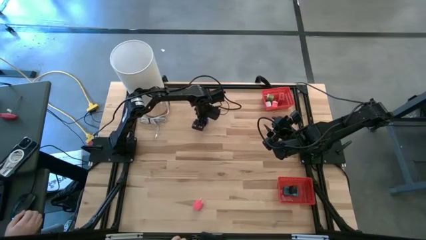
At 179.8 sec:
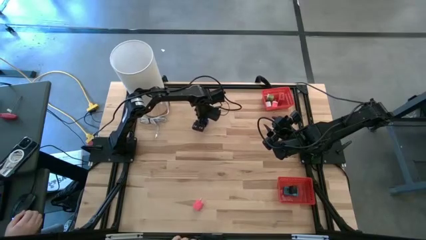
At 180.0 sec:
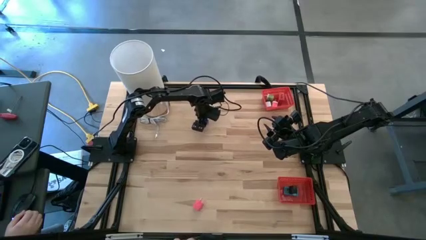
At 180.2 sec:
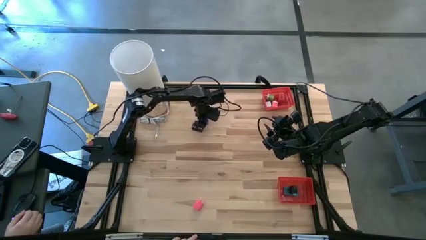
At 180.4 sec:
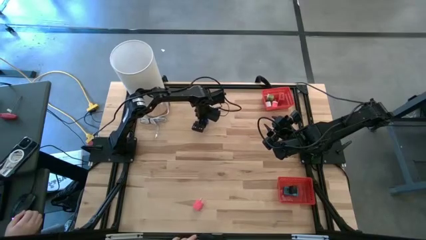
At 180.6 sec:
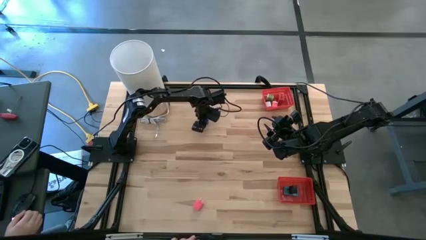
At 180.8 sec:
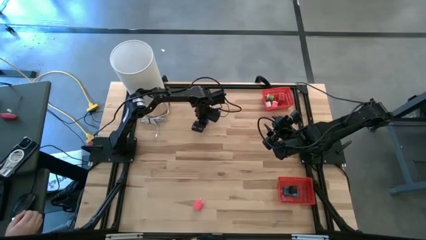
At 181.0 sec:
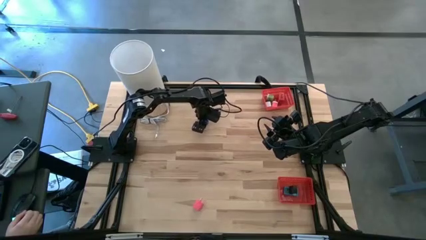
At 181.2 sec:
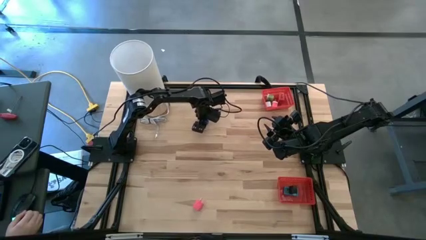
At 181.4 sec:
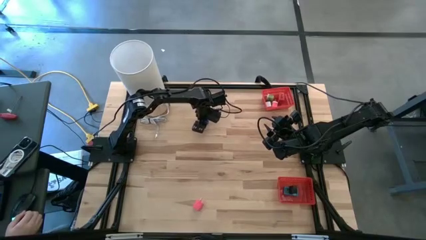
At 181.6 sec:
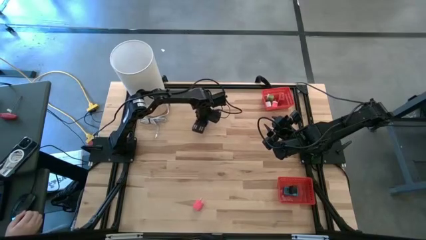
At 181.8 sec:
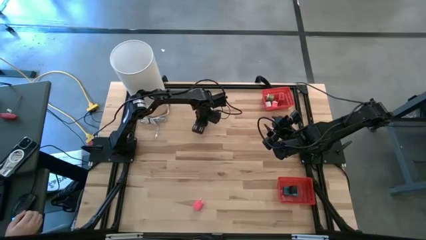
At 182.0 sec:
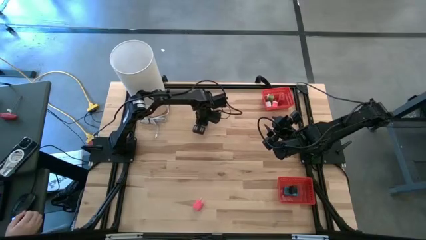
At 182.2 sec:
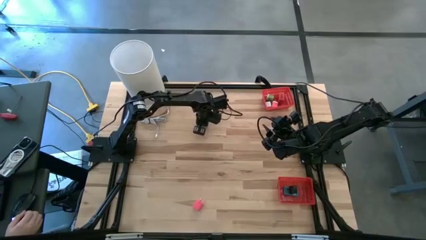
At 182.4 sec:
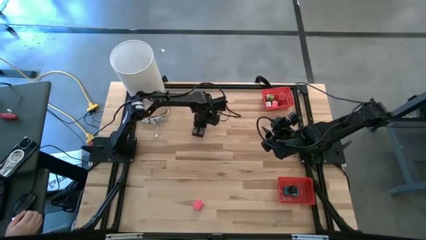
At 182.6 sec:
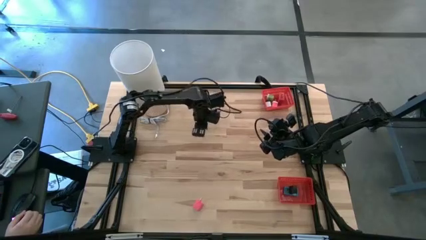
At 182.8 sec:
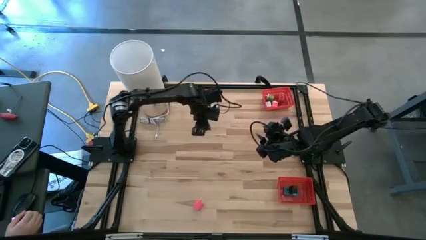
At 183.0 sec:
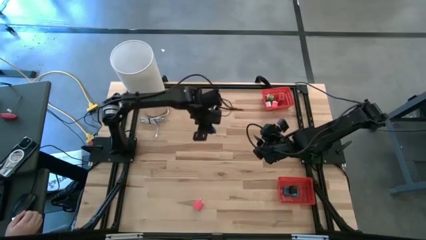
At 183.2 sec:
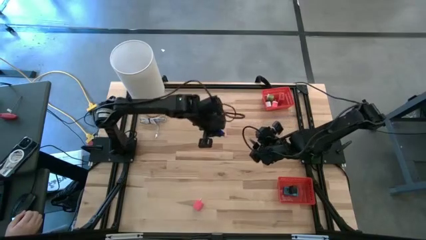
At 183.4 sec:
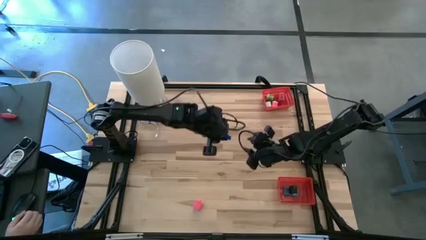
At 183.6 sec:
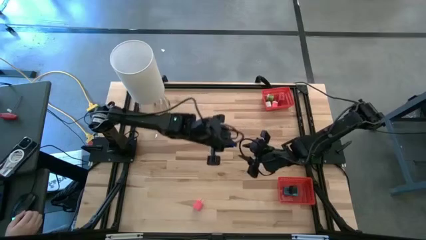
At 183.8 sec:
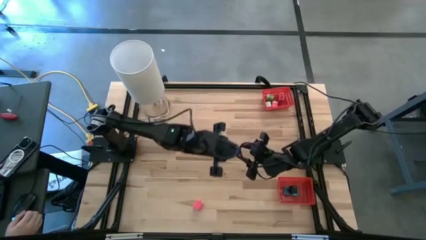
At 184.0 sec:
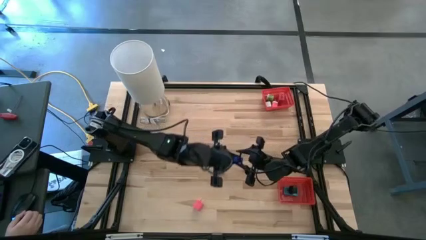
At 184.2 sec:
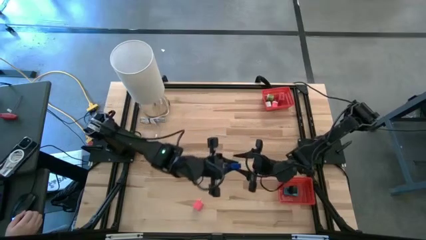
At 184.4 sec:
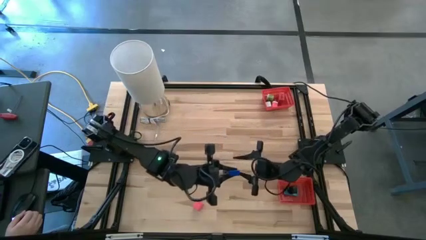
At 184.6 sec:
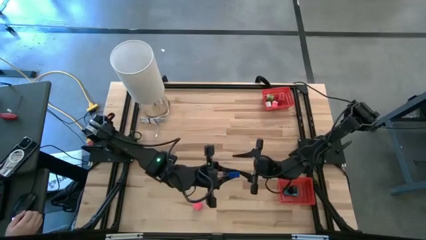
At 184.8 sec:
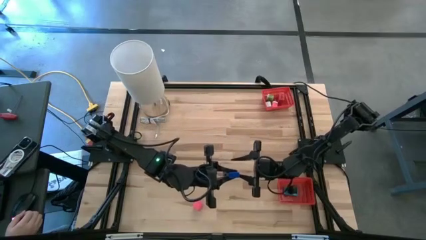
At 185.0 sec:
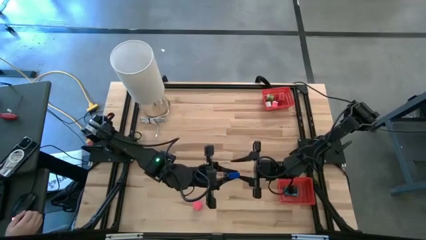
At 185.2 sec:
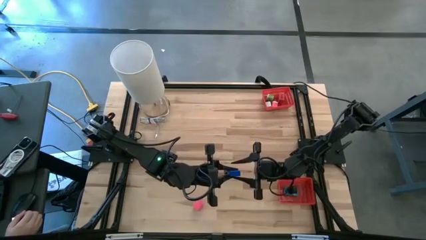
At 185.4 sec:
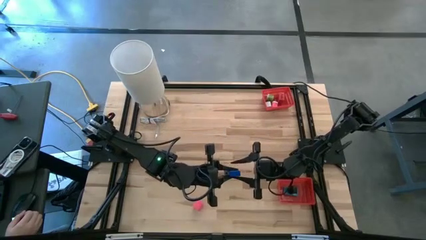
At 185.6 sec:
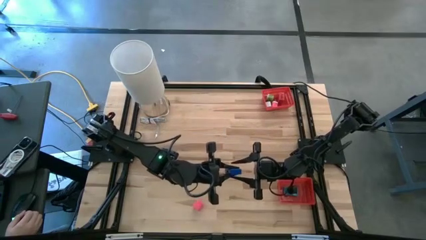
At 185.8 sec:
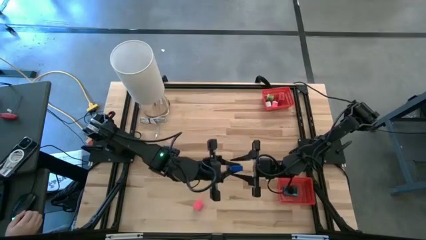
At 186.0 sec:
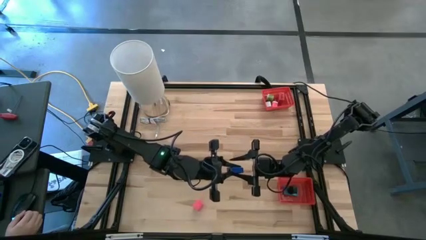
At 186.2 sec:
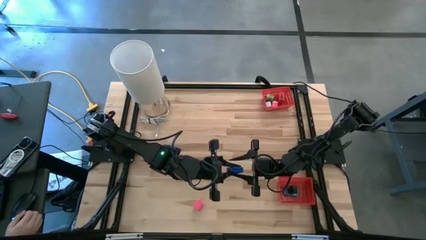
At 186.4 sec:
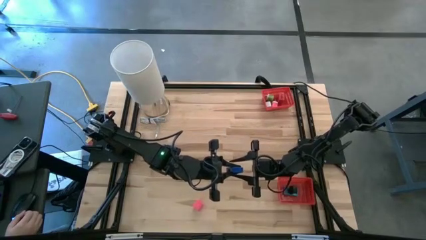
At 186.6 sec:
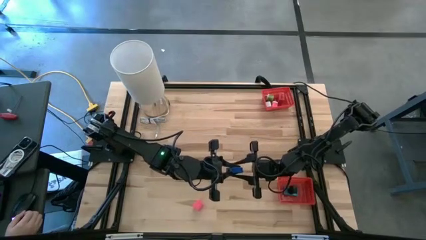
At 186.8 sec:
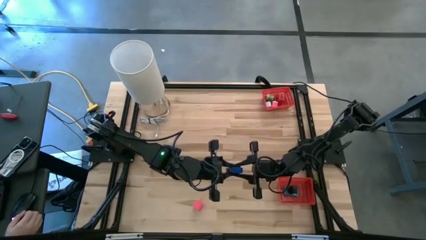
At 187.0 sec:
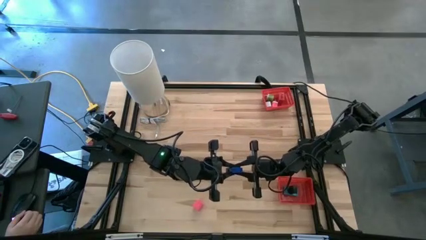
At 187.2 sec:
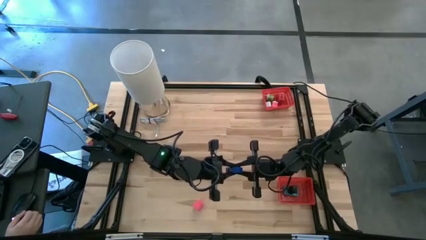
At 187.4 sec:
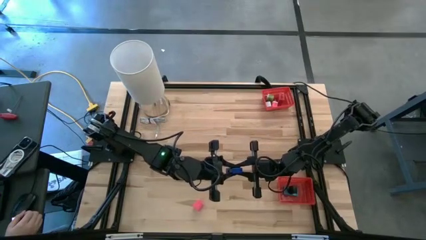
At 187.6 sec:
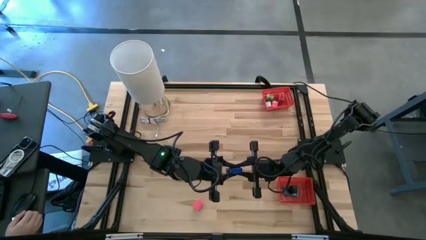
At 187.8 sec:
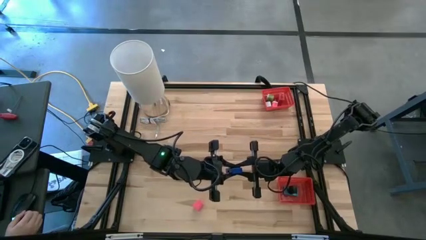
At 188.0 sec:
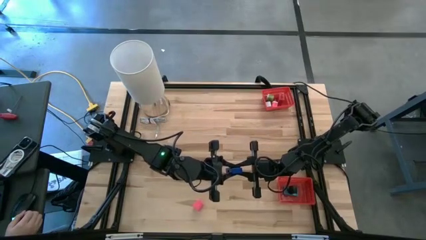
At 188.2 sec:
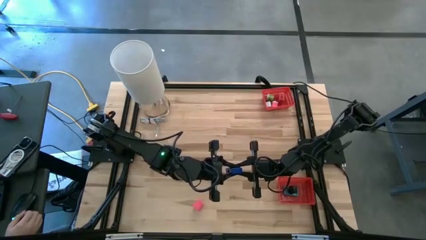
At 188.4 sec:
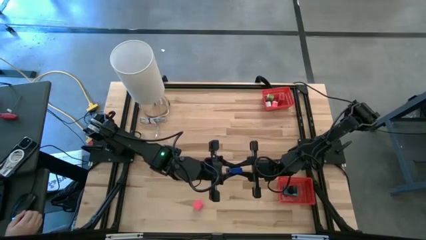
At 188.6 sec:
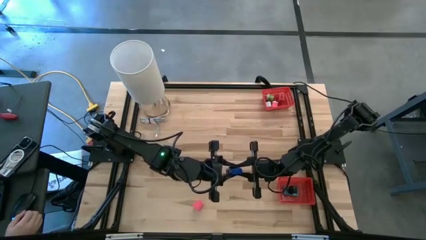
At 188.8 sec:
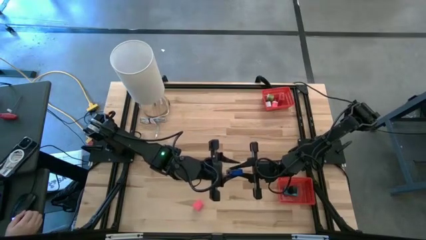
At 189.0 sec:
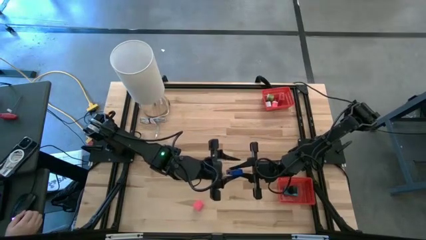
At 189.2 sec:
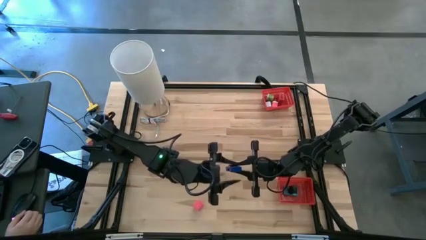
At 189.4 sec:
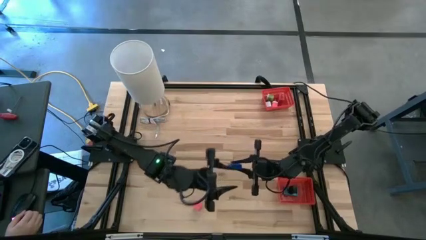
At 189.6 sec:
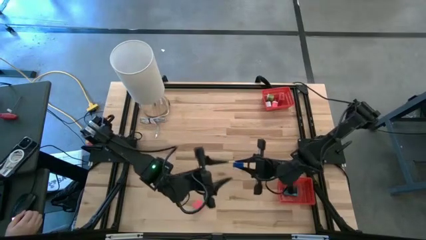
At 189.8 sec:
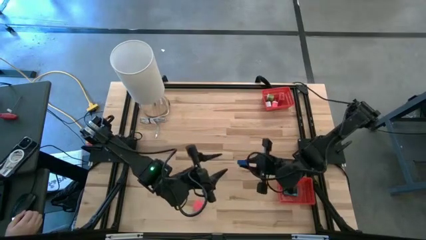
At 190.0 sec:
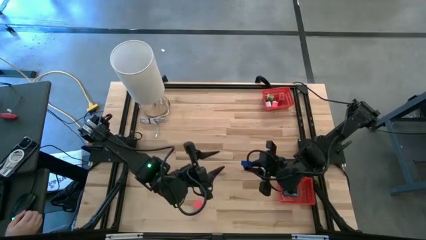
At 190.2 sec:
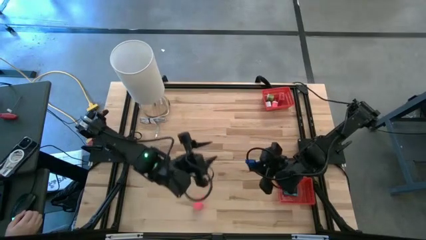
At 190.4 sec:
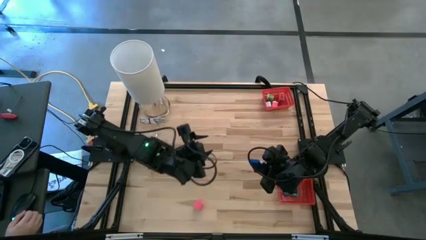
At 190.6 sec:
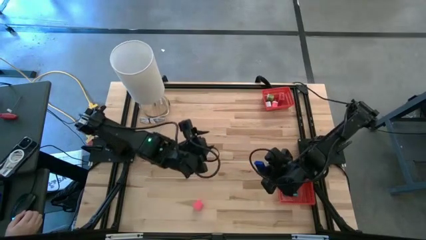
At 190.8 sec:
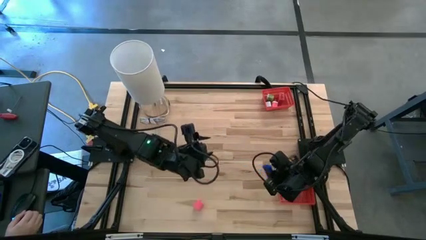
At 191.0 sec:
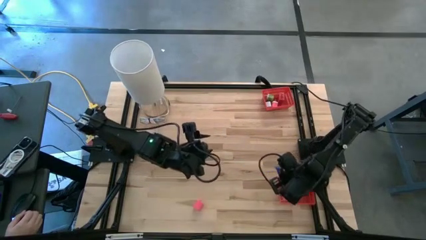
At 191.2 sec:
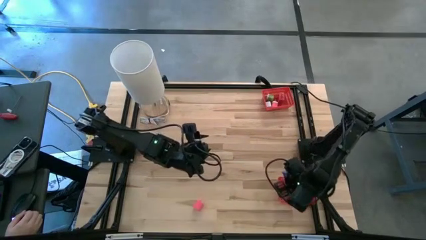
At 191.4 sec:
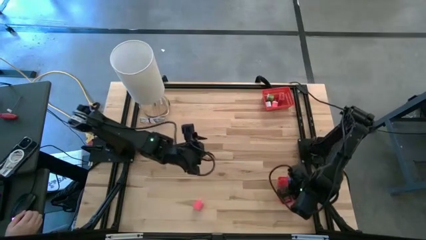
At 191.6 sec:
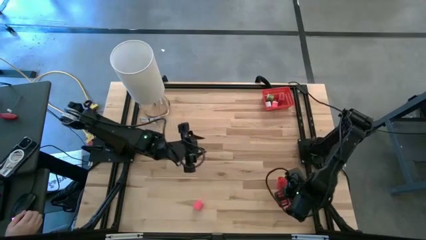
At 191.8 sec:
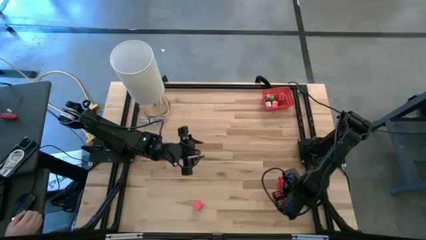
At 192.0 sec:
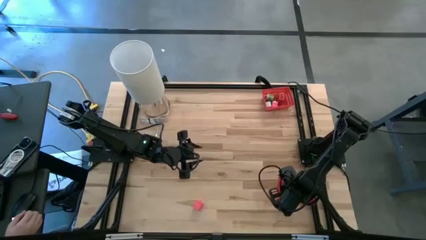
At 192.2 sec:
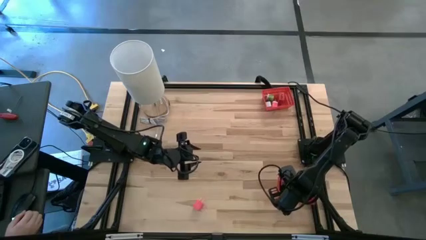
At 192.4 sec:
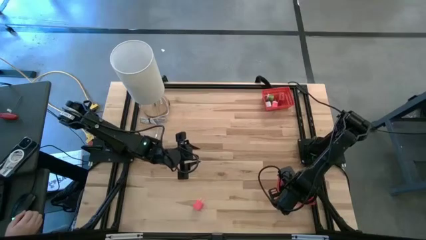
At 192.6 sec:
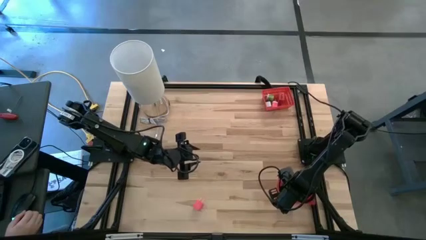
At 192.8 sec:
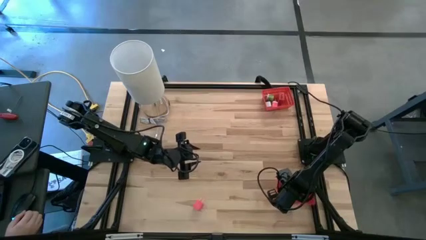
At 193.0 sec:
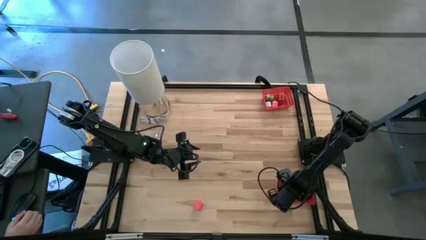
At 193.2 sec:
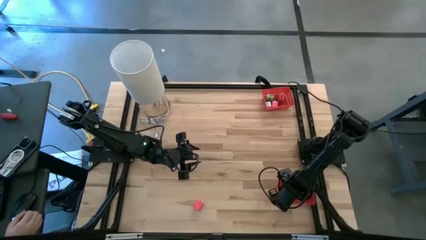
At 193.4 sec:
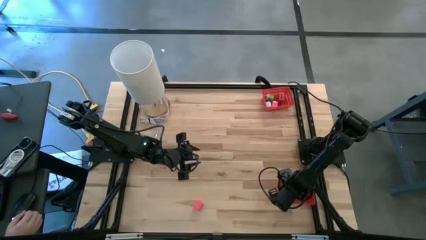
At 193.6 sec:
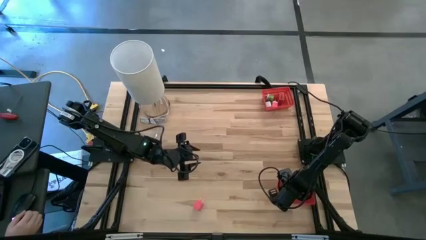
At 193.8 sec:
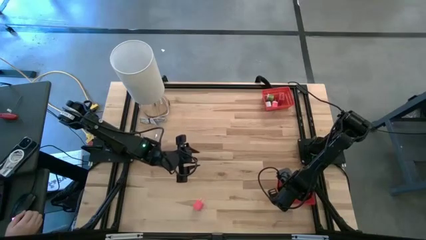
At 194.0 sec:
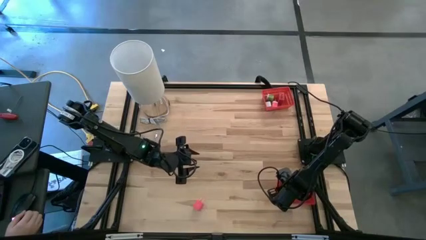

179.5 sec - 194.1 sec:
Task: Pick & Place Office items
Put the blue digital clock into the bottom red basket
